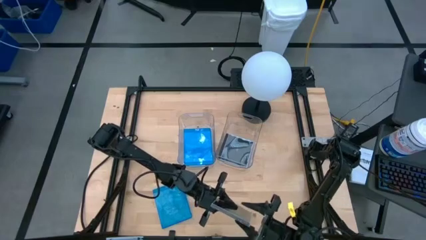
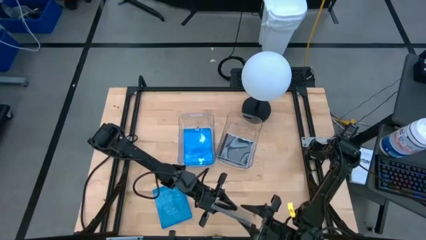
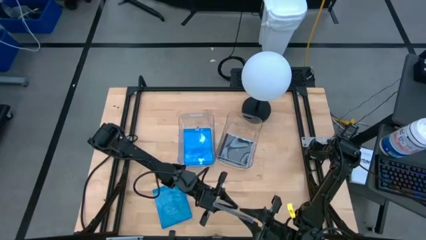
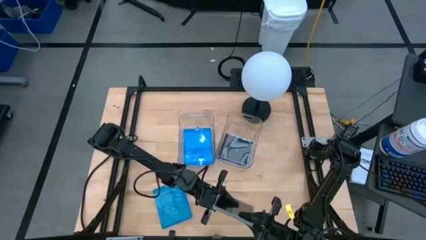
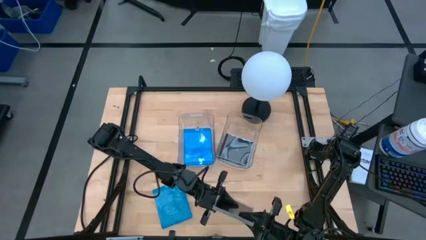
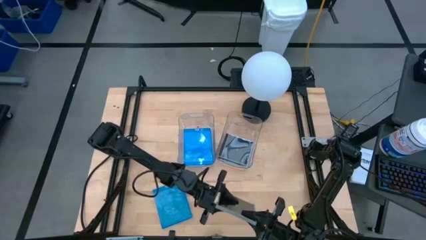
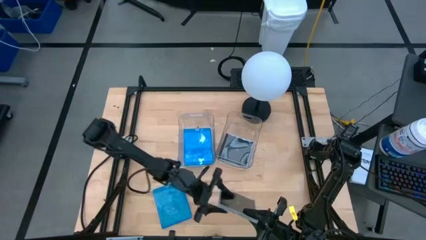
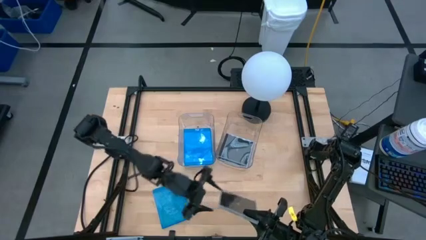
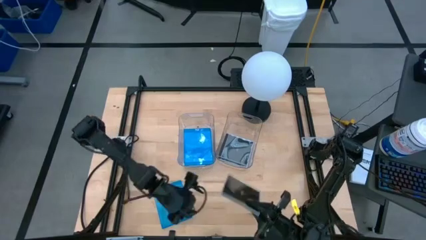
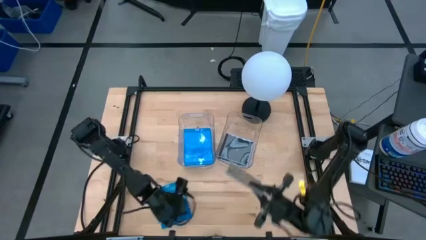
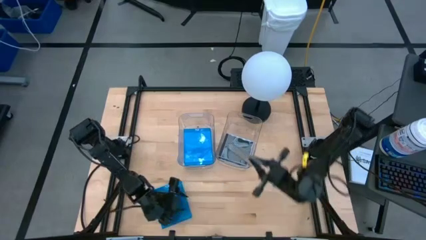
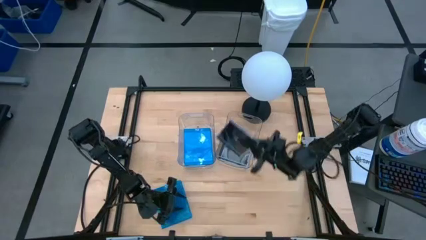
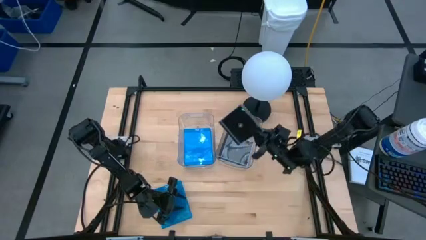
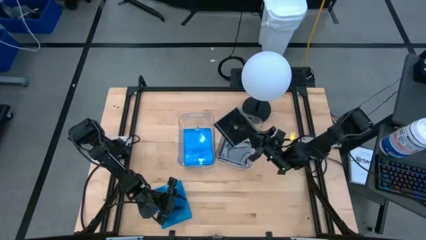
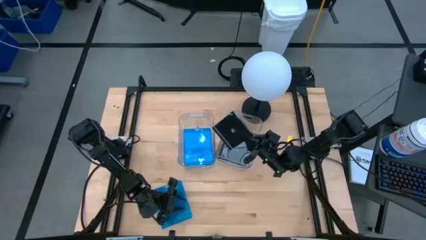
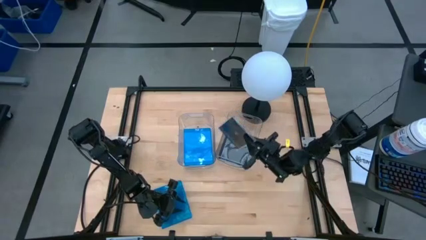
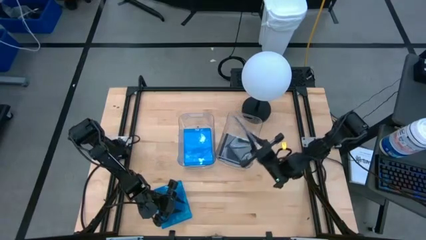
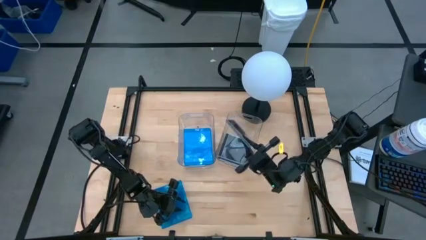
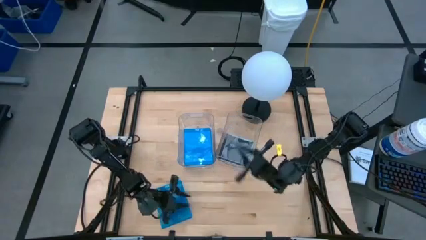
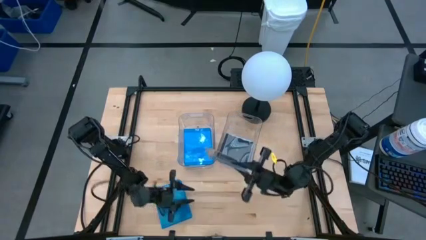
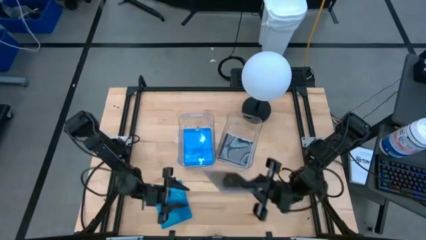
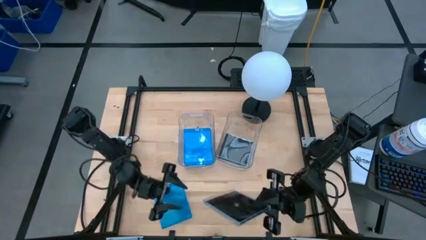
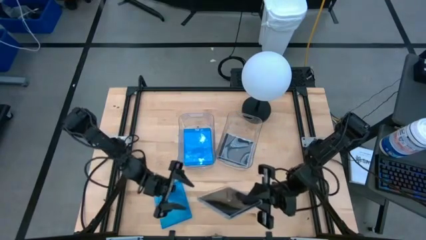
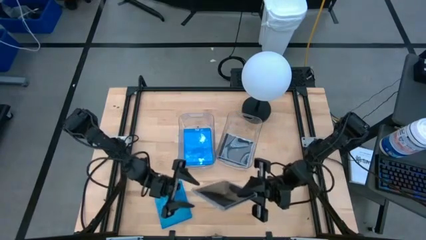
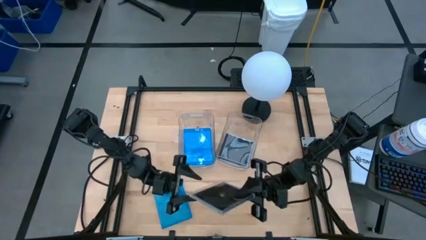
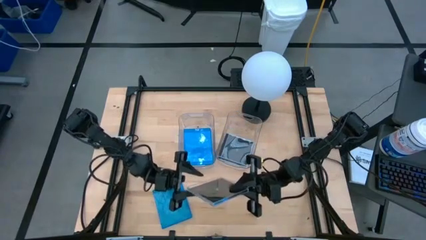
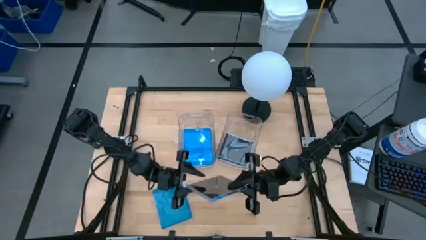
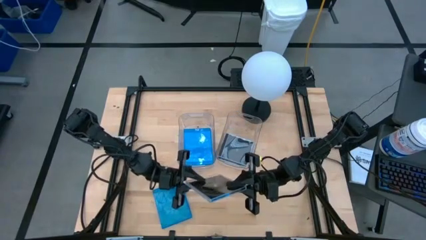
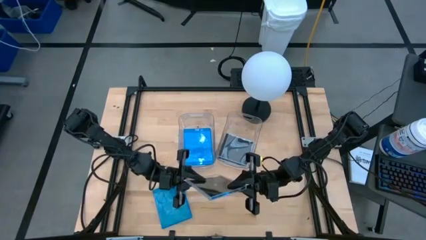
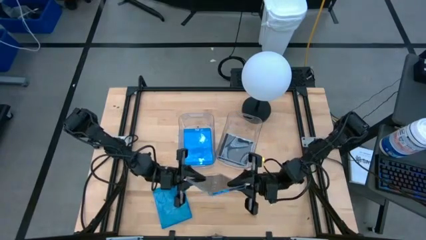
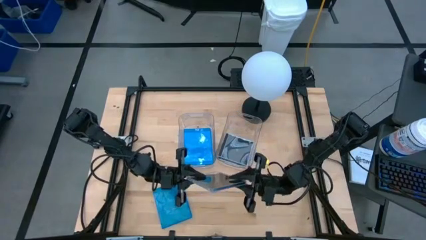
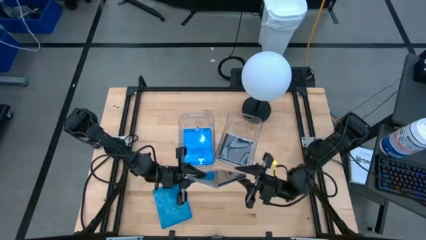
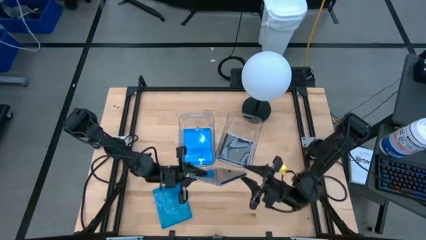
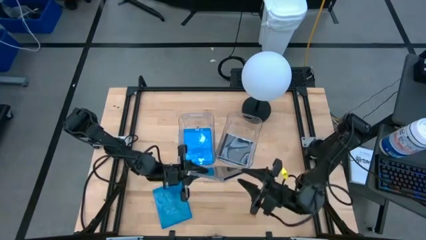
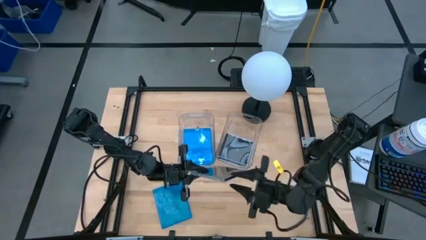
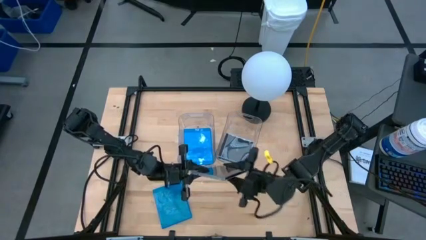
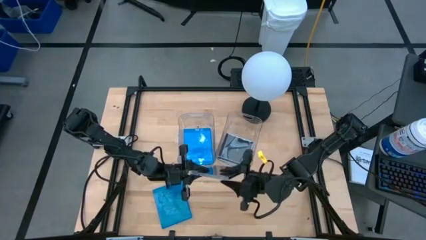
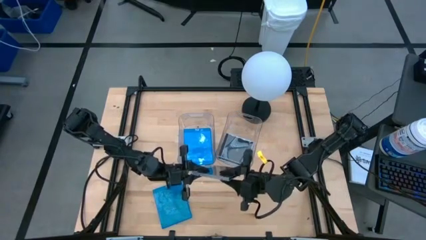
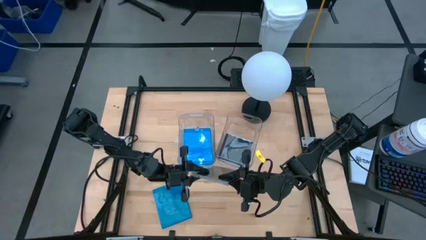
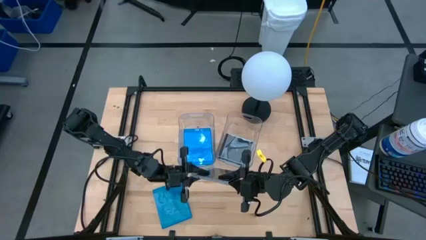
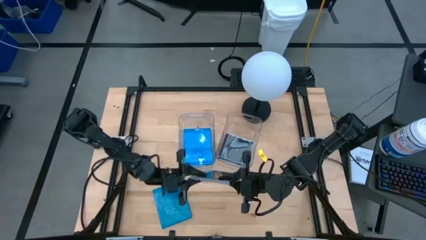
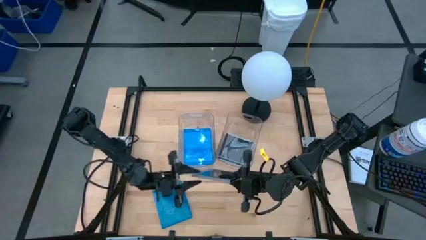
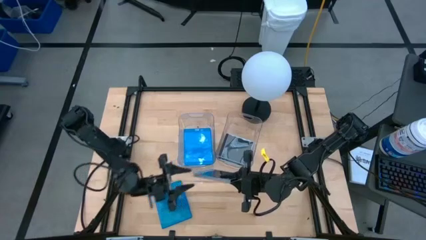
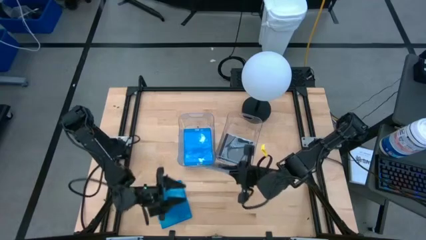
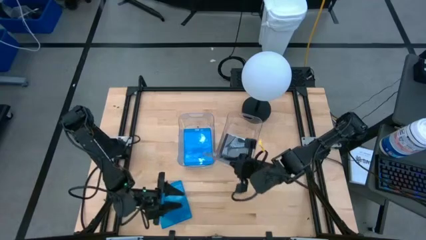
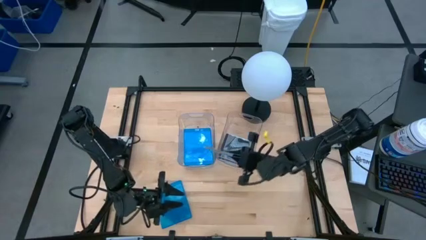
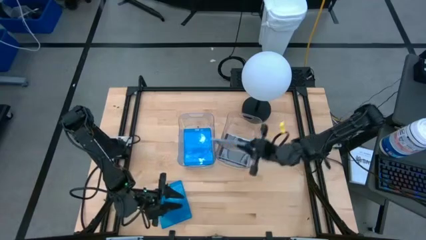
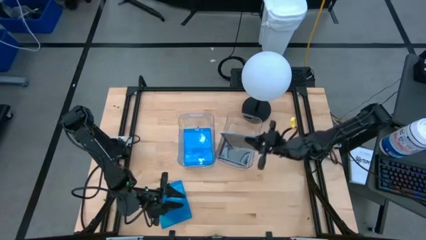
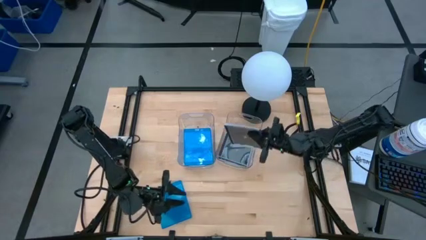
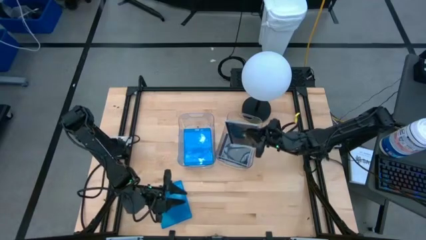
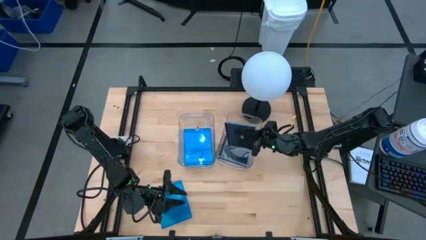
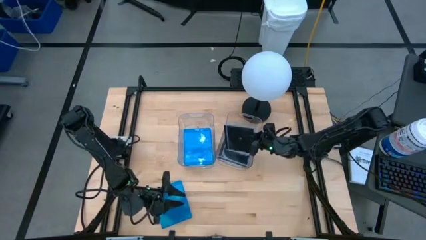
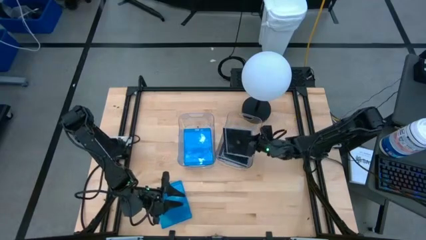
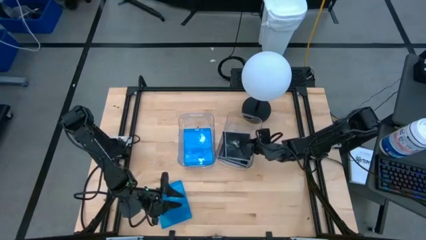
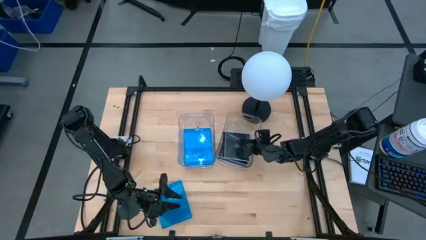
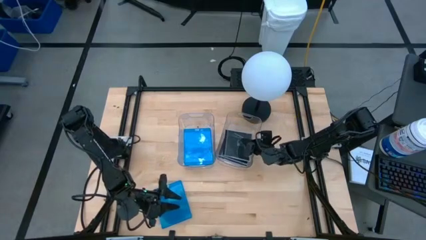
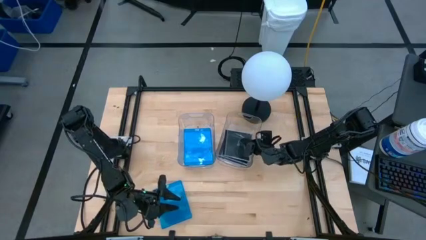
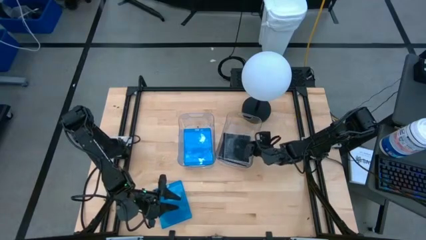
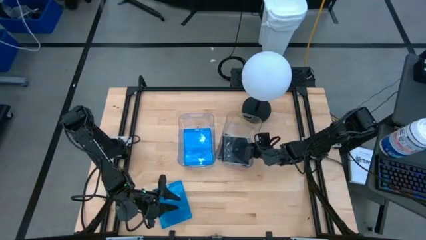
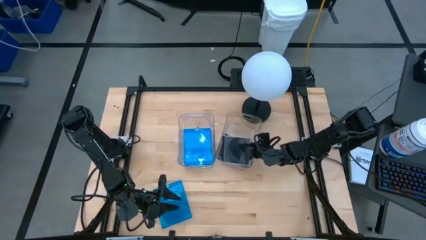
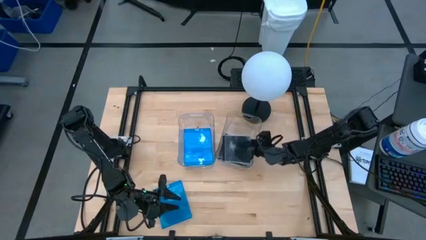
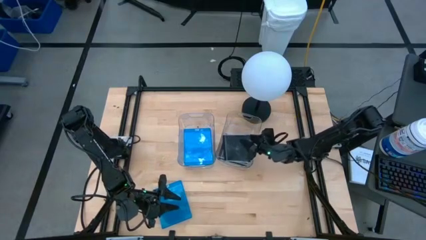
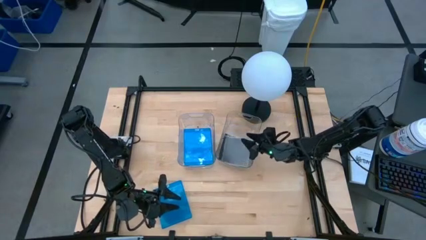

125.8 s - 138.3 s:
Task: Pick & place jewel cases by type
Put the black cd case into the right transparent bin

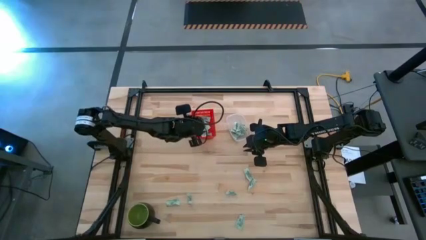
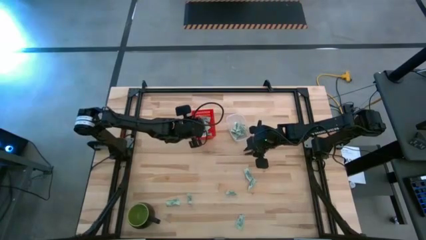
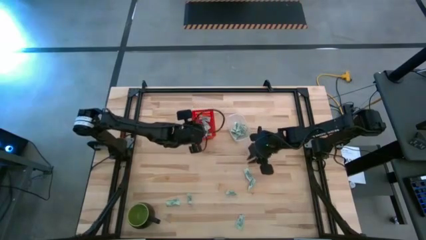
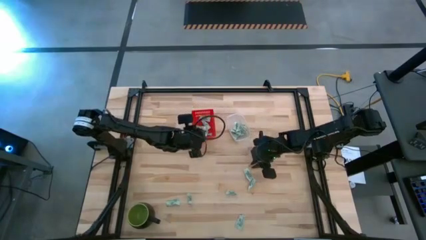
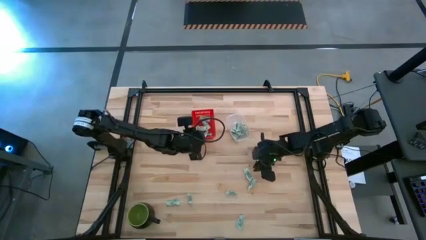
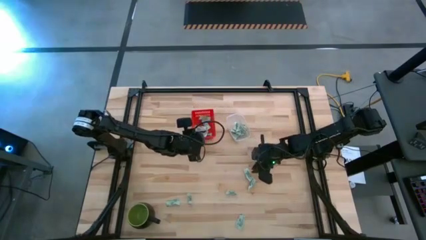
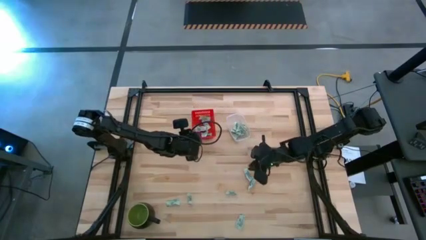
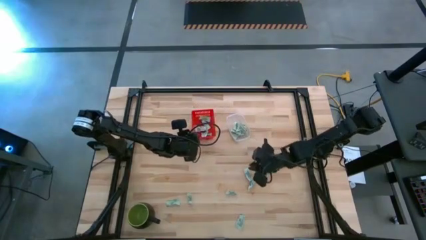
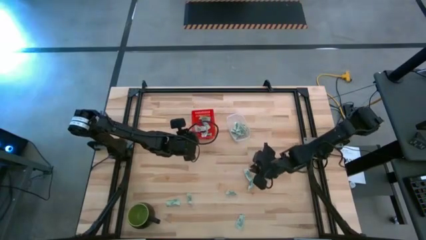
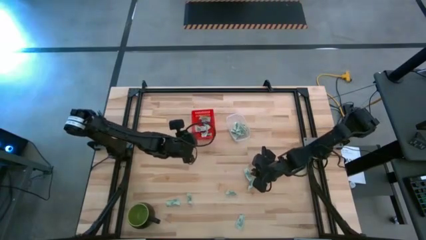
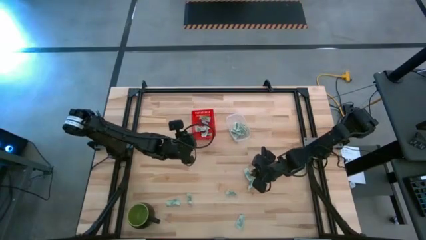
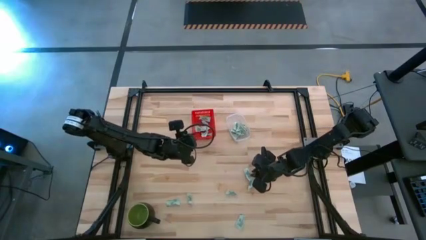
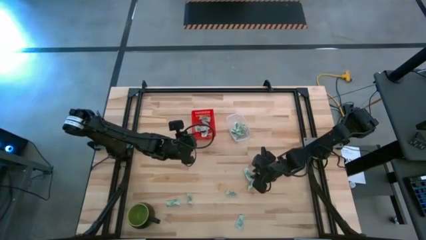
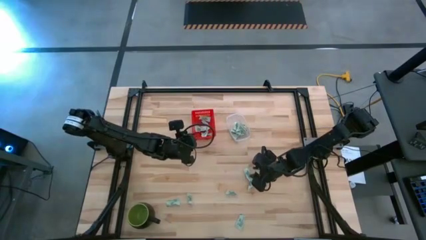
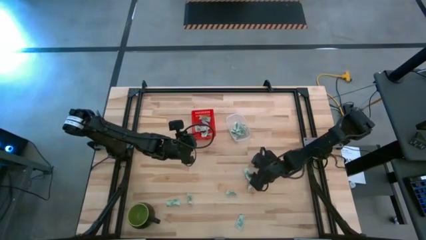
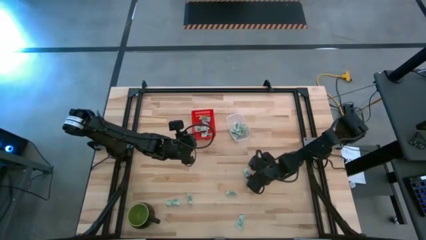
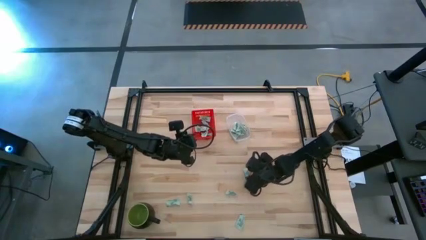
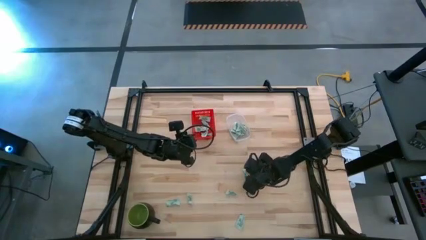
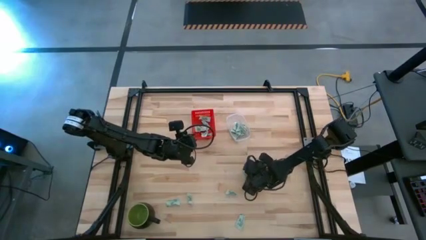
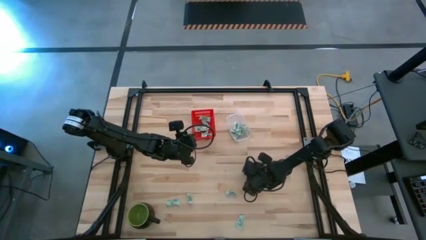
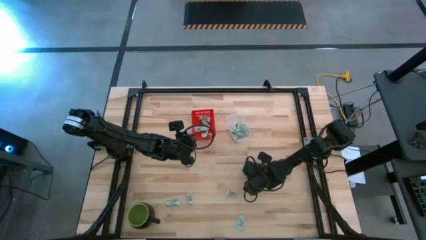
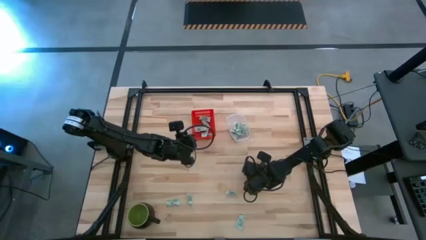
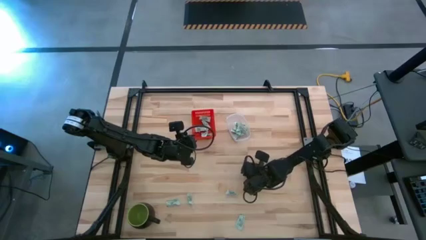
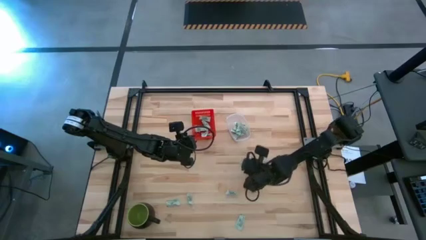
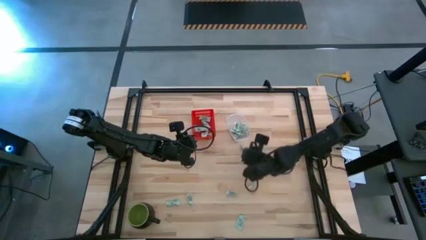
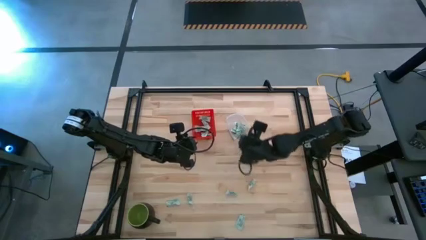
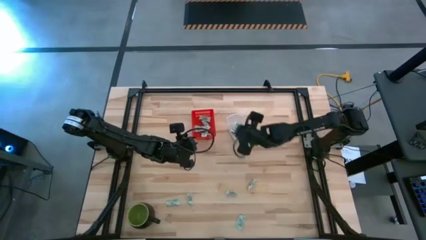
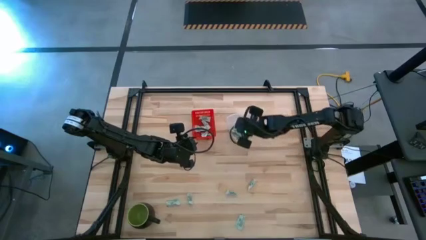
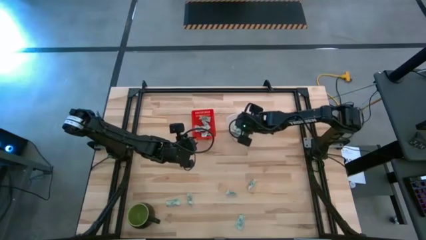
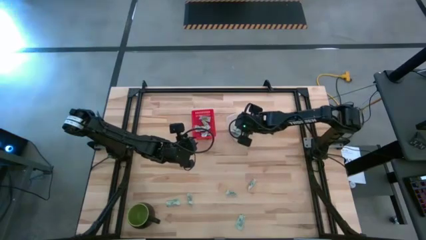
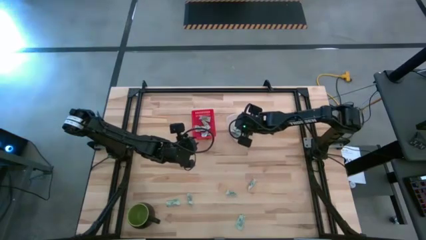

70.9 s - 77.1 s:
Task: Pick and place items into bin
Put the white stevia packet into the transparent bin
